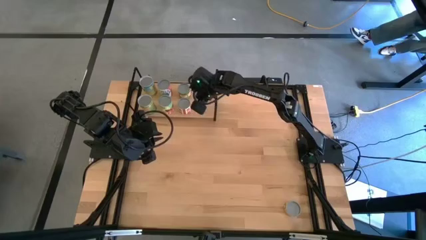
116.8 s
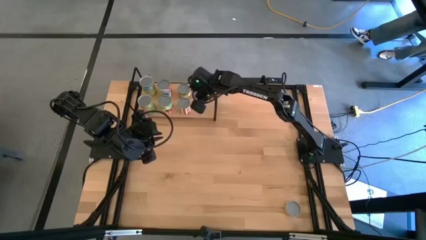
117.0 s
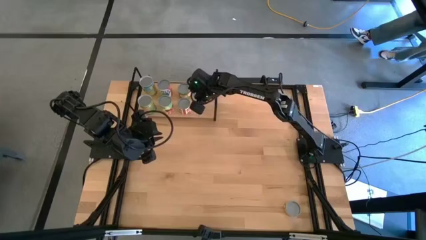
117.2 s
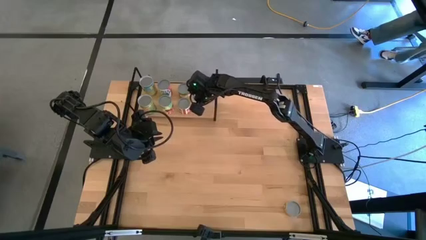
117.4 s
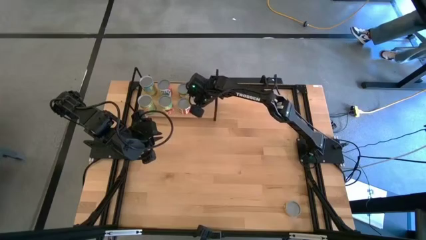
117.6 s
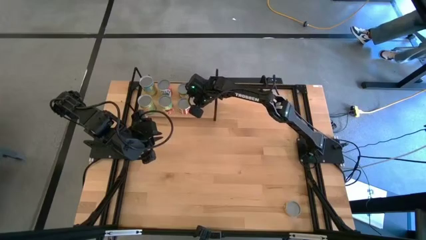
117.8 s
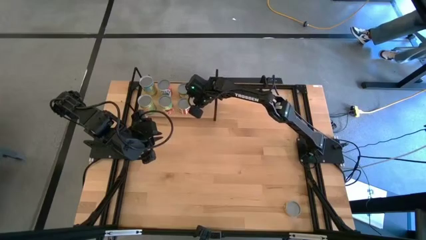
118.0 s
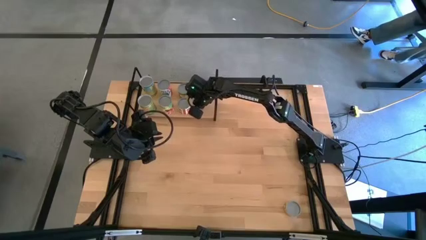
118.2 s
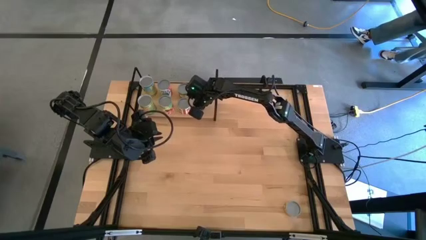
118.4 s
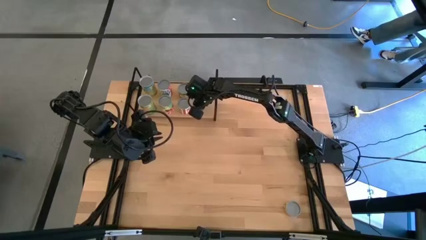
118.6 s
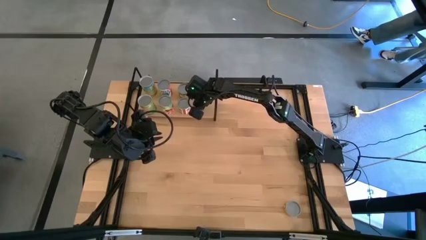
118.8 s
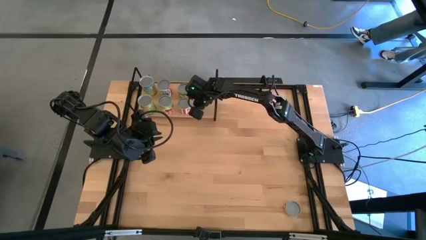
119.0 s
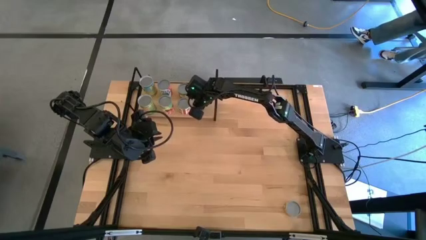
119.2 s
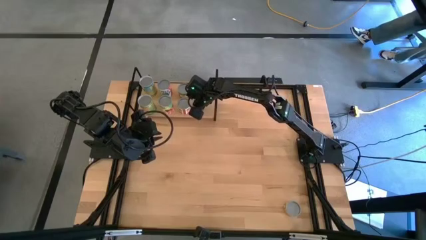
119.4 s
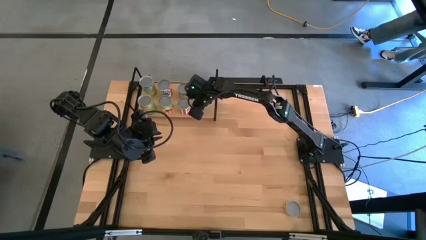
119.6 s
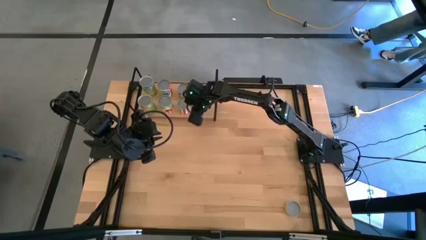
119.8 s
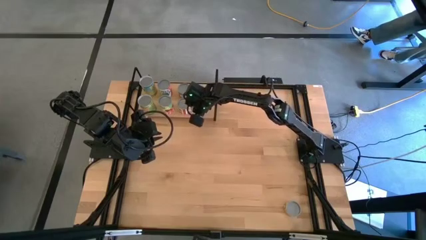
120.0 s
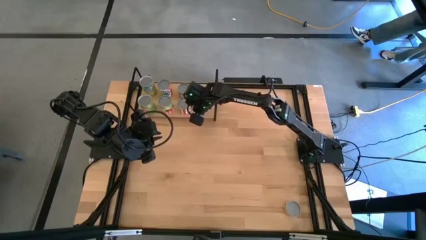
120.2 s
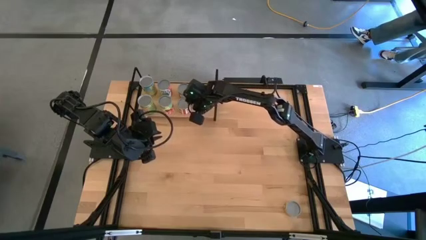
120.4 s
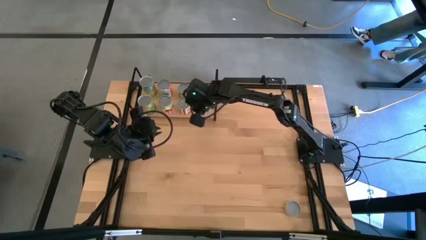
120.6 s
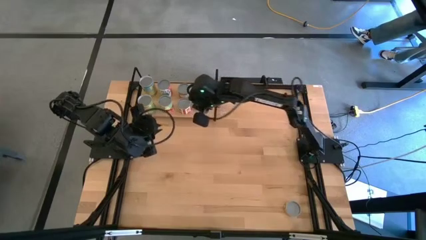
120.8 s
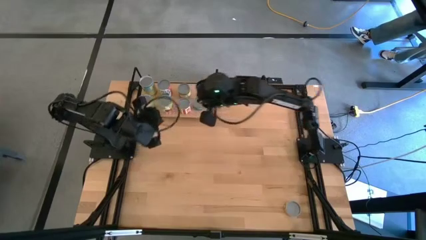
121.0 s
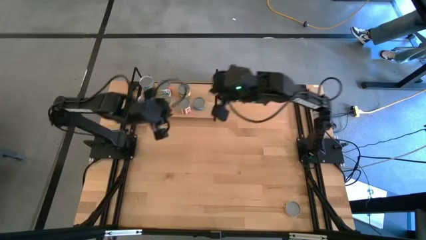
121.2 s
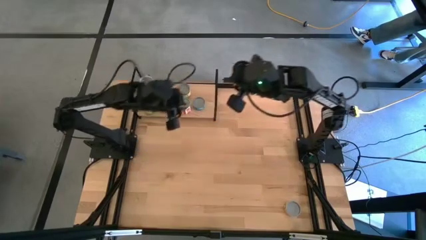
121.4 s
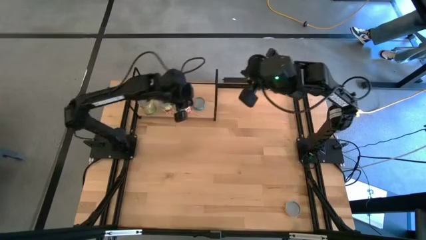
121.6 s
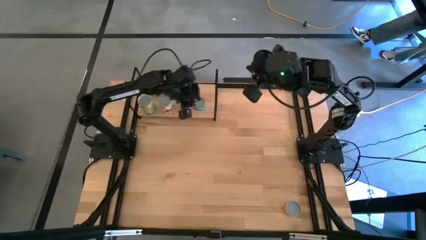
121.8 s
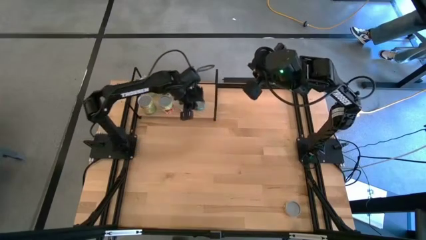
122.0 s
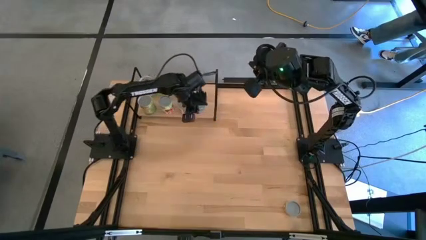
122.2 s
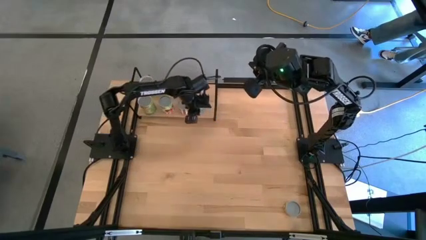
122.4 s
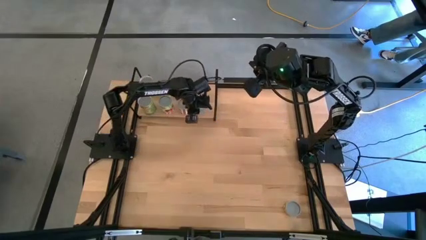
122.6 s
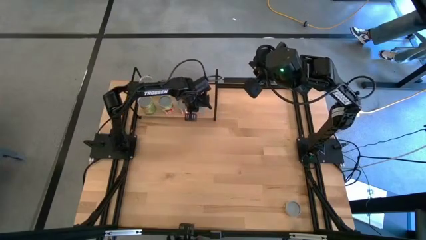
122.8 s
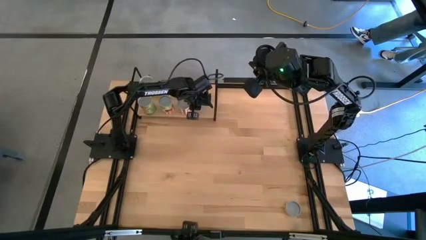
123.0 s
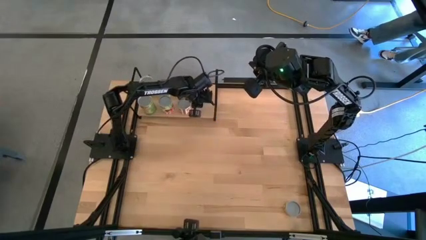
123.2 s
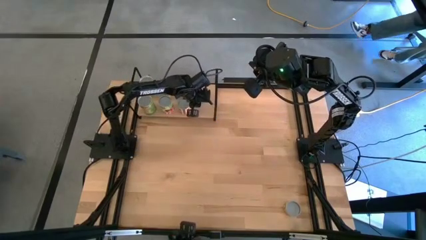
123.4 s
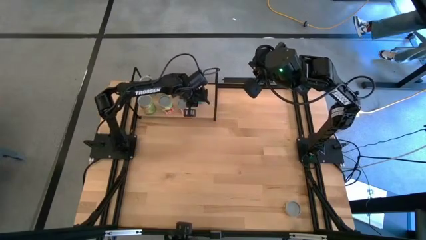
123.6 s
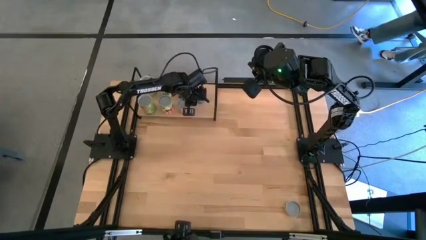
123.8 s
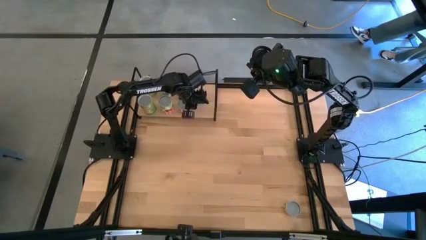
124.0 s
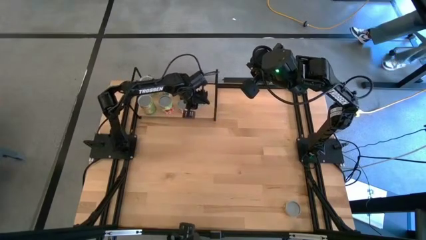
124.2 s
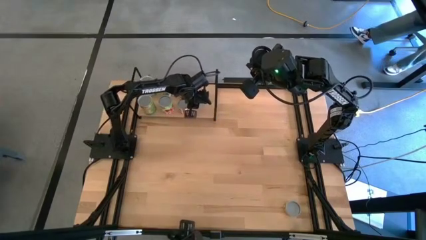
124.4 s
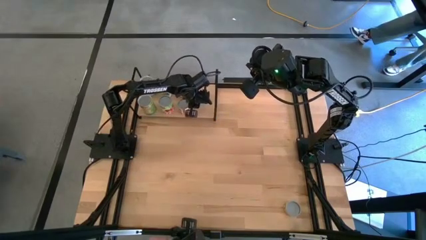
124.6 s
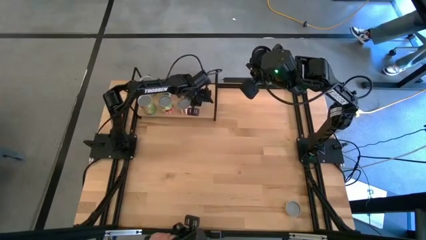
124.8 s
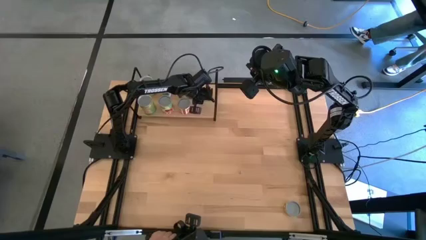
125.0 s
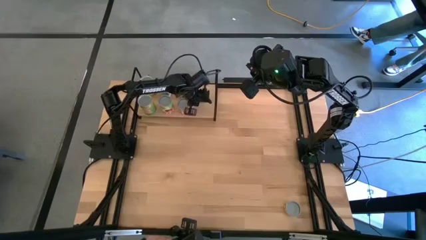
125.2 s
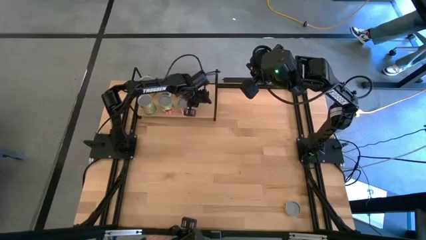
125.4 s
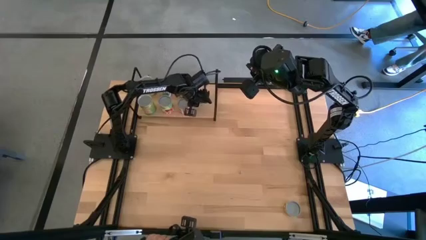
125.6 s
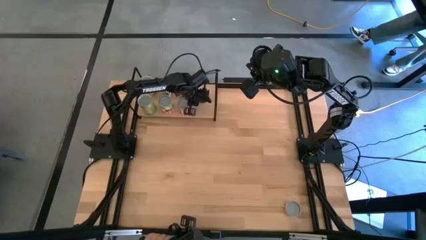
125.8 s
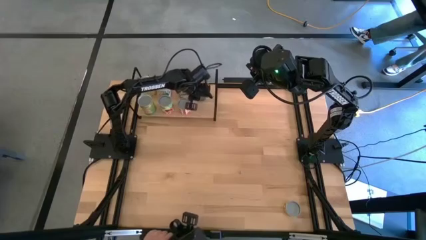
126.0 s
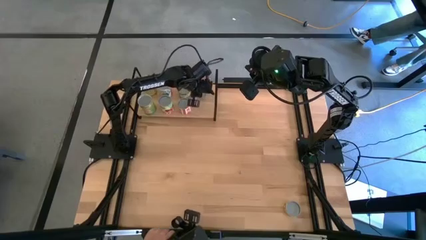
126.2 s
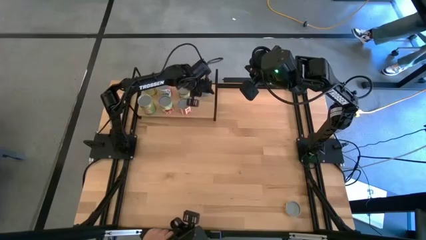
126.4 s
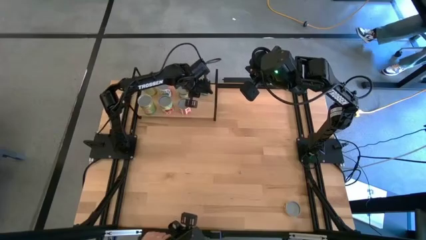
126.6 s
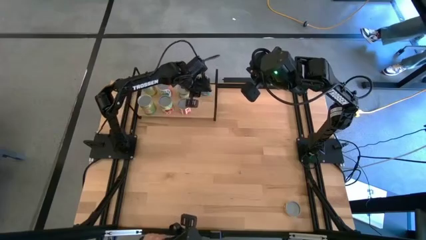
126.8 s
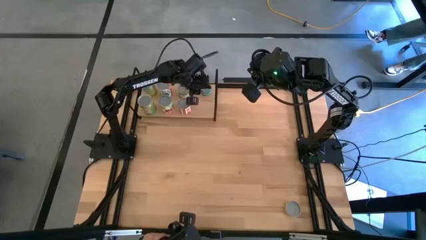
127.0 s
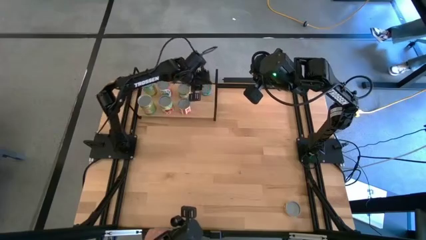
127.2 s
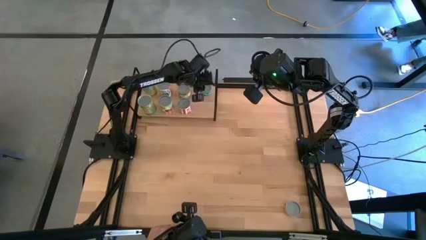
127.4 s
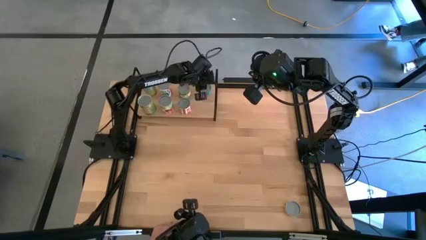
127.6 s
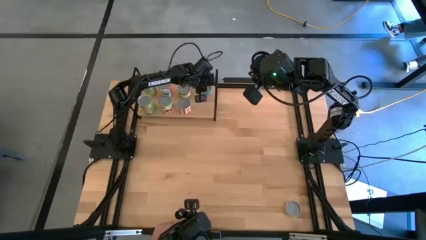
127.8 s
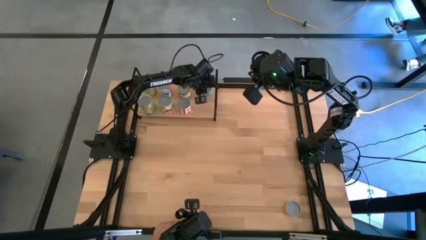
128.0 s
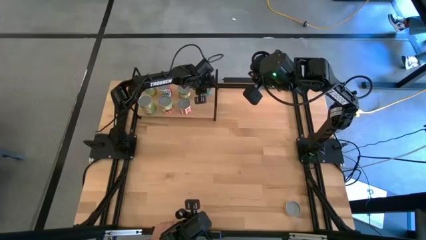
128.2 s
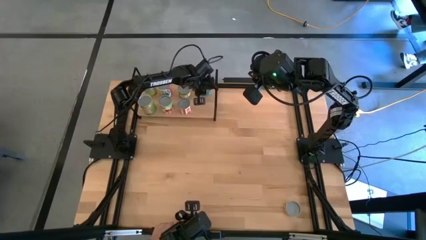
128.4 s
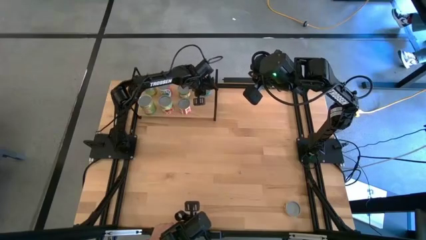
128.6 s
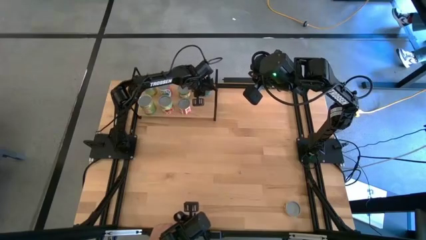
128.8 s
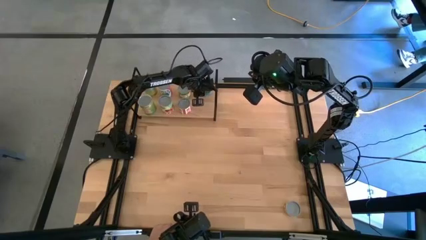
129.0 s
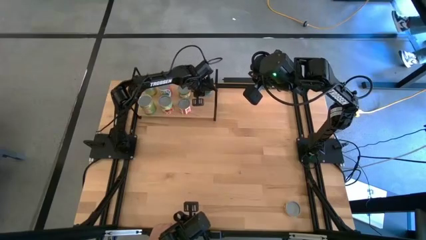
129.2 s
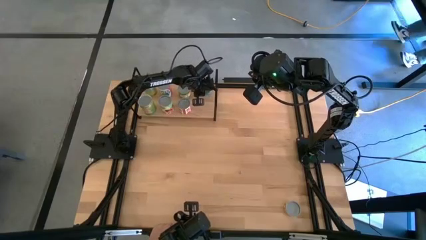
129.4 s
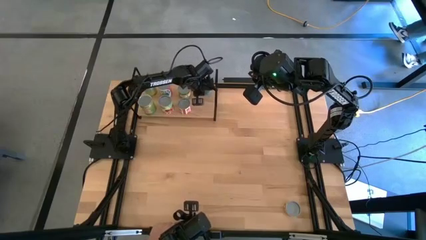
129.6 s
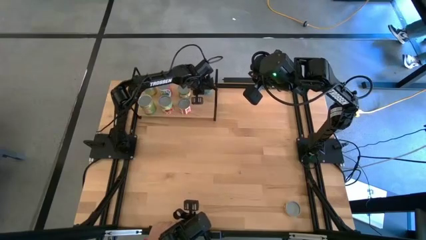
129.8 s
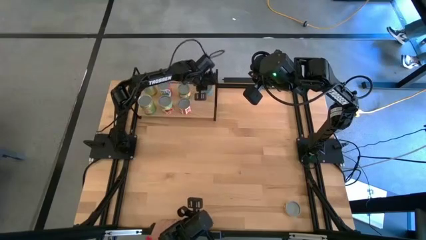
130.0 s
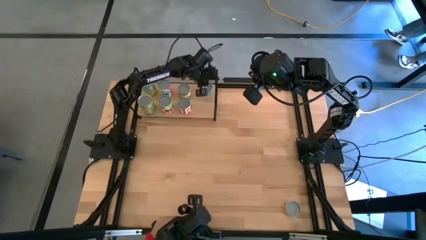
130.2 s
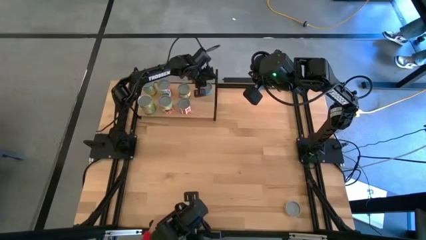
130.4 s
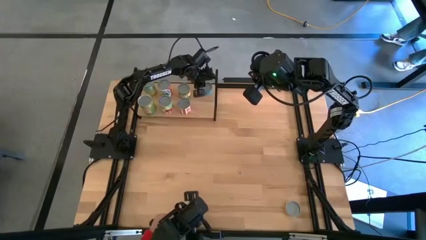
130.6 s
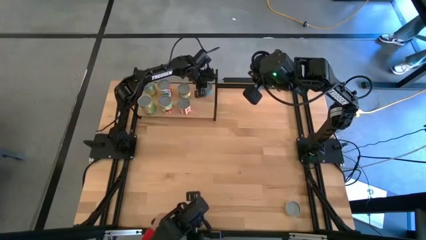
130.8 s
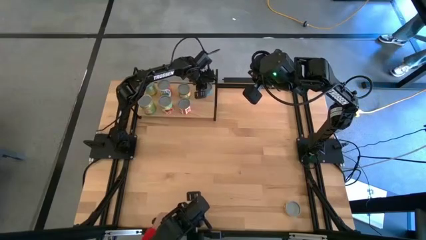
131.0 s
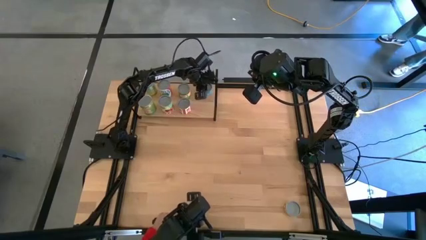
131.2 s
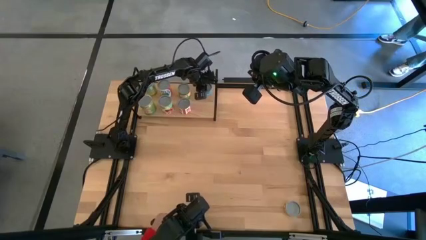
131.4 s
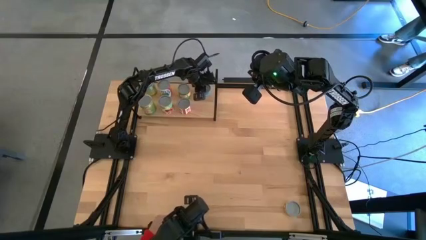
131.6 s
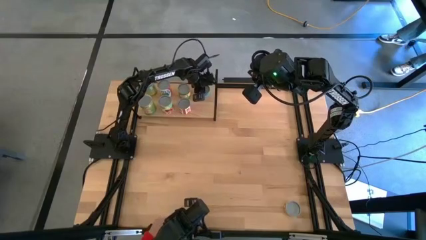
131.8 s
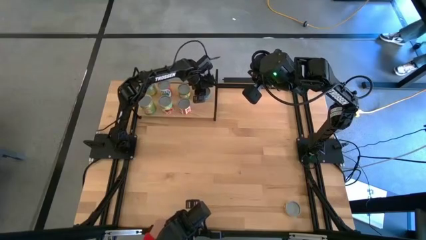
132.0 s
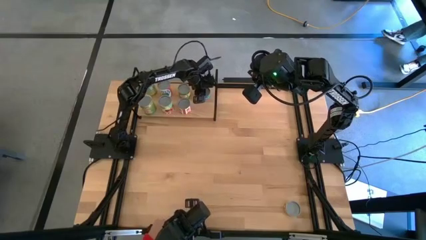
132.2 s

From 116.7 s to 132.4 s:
Task: Pick and place cans onto a shelf
Put the canned tuna on the shelf

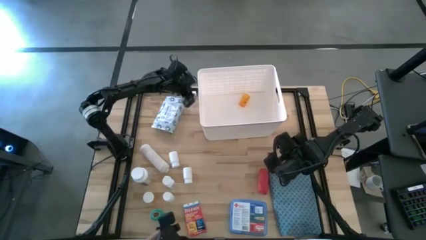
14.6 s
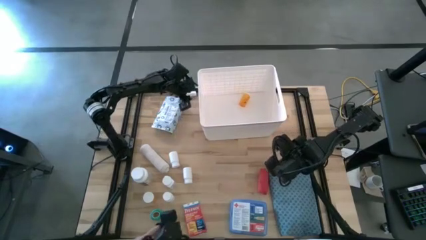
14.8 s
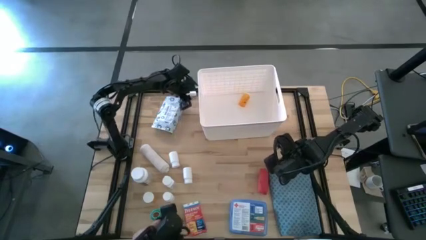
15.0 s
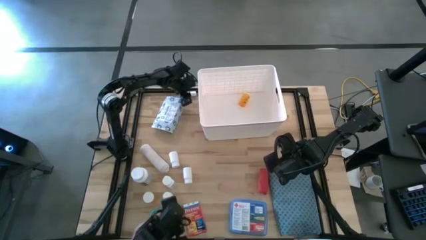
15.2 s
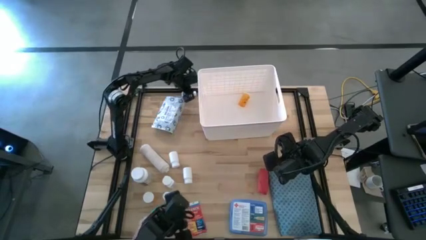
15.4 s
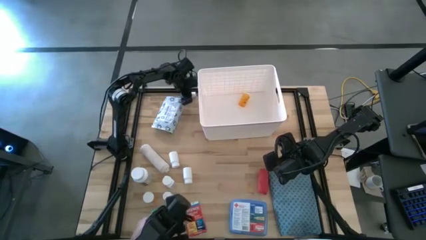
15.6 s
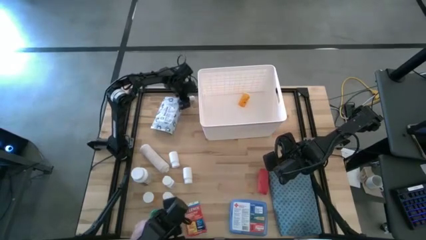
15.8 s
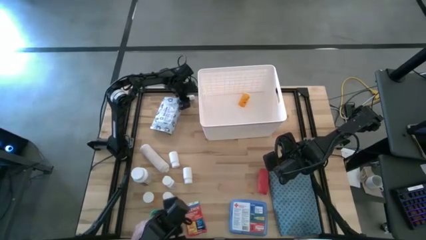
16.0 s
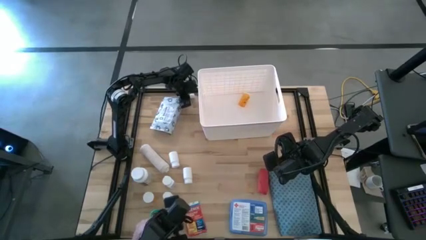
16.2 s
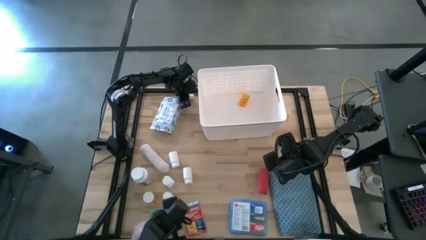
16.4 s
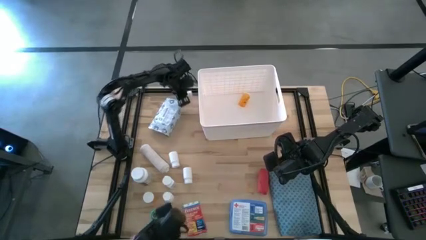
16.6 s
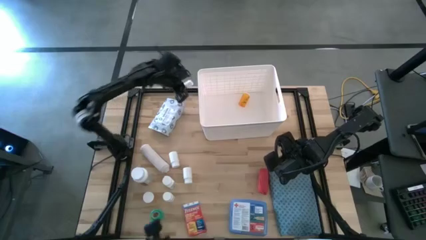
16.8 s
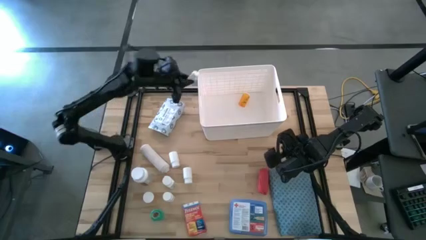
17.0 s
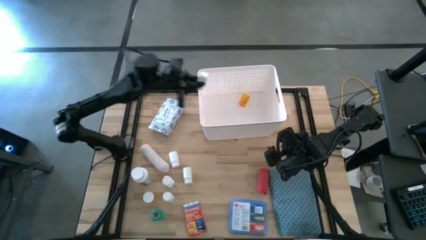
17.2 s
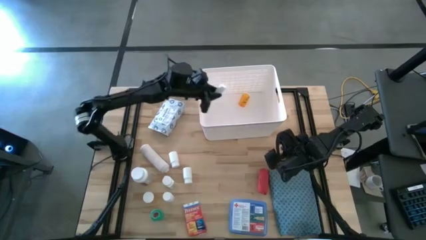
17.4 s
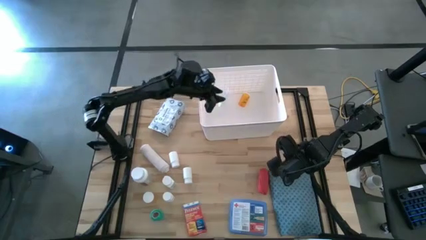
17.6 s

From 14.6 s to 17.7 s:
Task: Pick & place medical supplies in basket/bin
Put the white rolled gauze into the white bin
